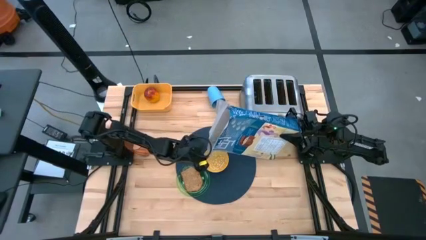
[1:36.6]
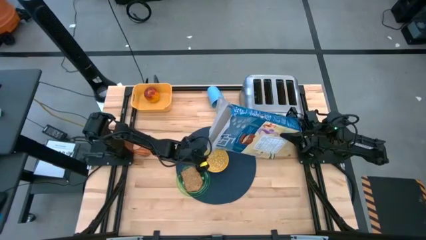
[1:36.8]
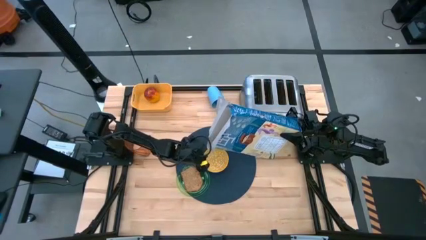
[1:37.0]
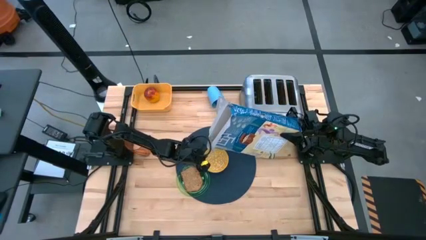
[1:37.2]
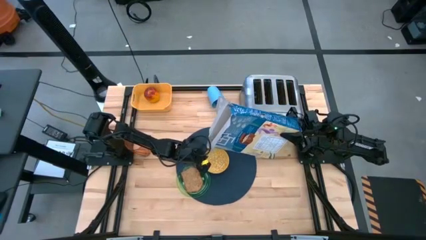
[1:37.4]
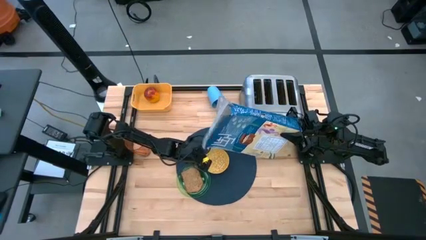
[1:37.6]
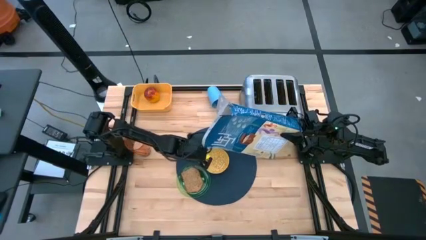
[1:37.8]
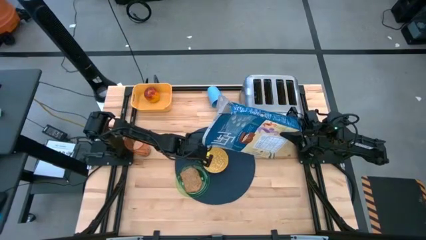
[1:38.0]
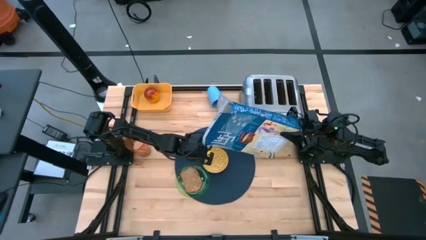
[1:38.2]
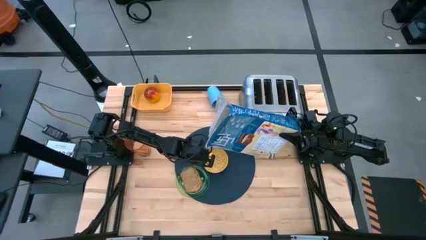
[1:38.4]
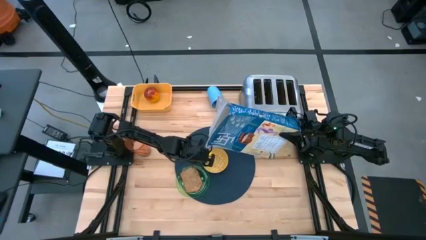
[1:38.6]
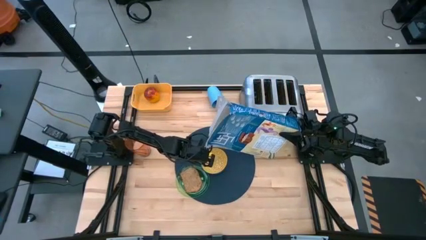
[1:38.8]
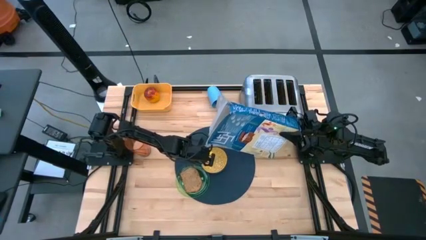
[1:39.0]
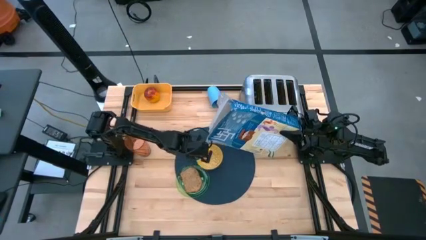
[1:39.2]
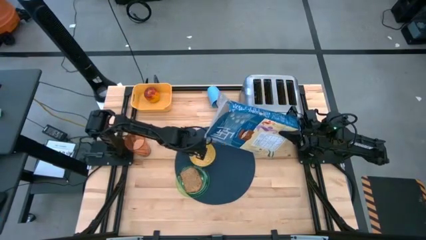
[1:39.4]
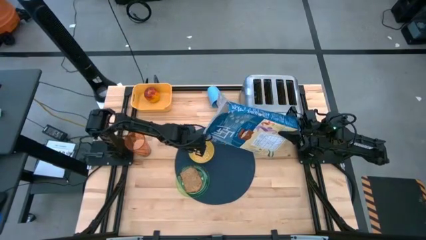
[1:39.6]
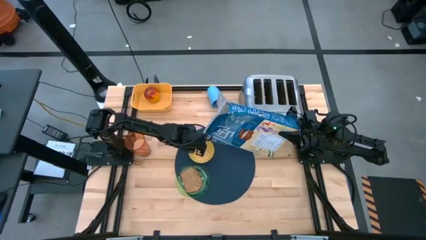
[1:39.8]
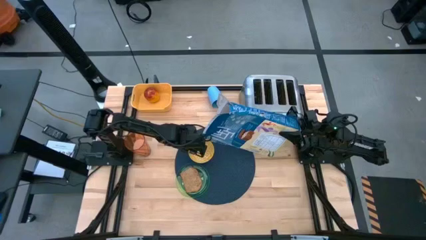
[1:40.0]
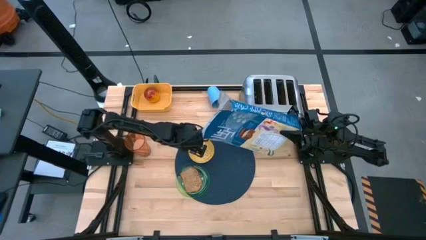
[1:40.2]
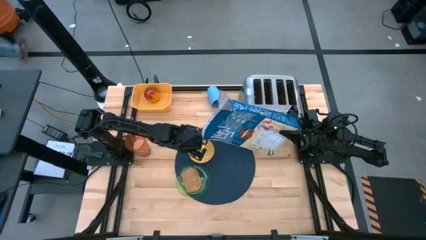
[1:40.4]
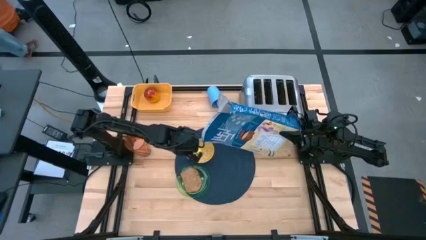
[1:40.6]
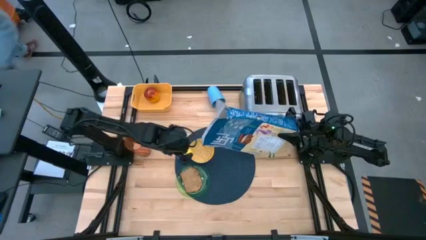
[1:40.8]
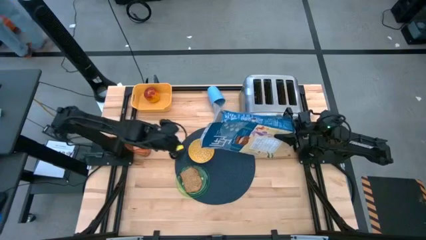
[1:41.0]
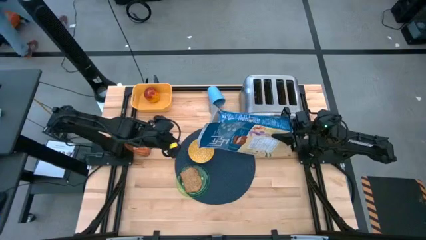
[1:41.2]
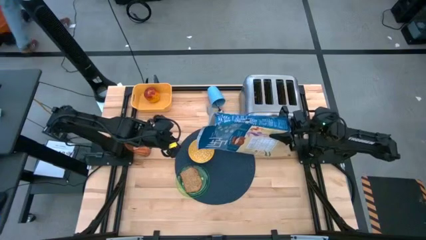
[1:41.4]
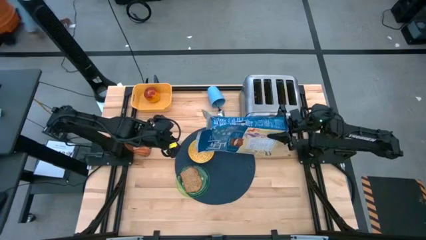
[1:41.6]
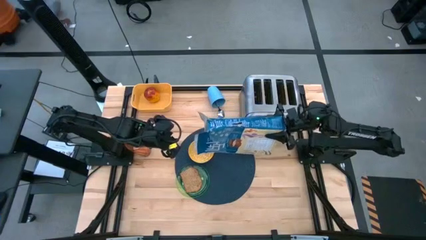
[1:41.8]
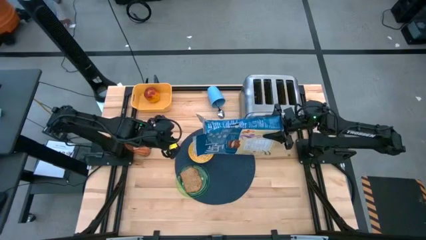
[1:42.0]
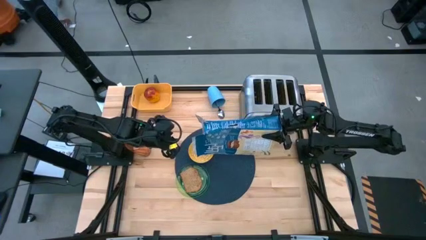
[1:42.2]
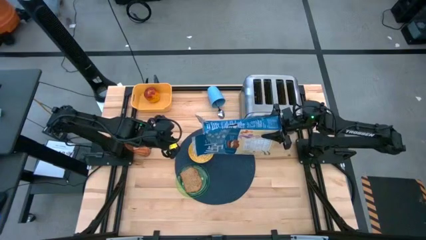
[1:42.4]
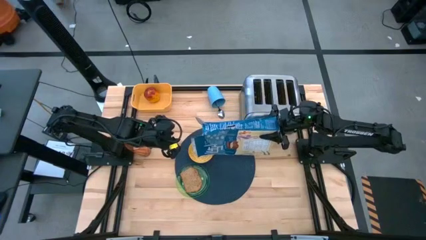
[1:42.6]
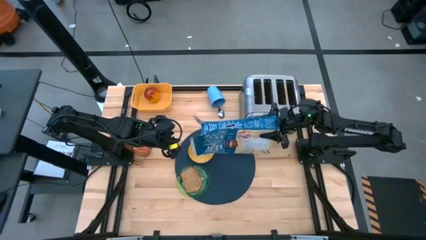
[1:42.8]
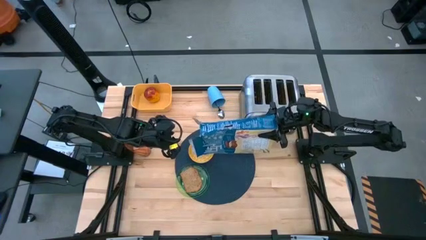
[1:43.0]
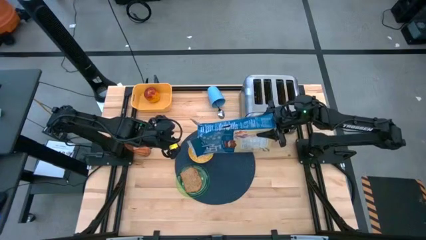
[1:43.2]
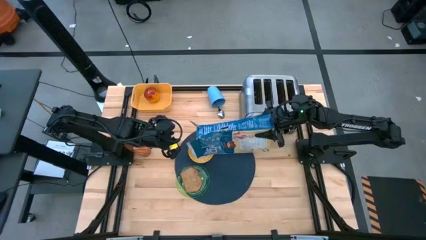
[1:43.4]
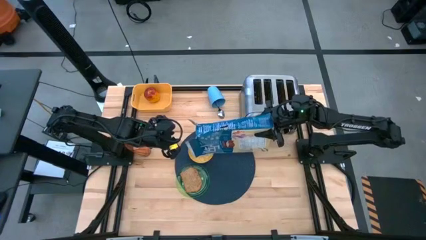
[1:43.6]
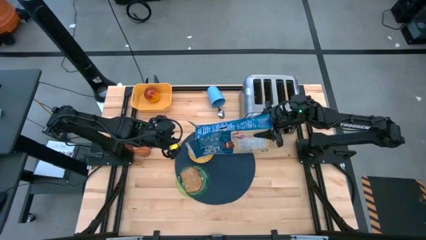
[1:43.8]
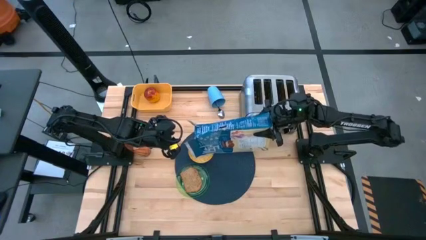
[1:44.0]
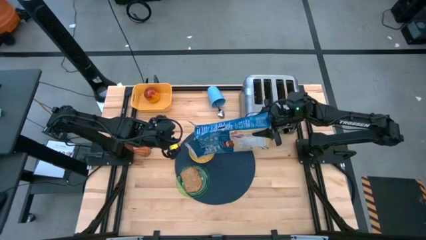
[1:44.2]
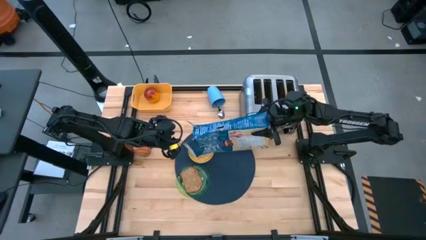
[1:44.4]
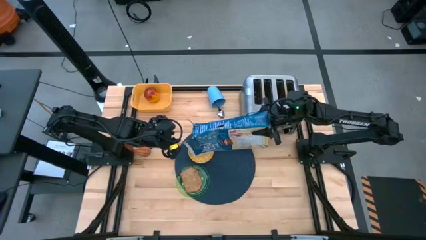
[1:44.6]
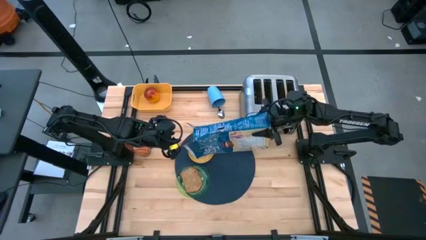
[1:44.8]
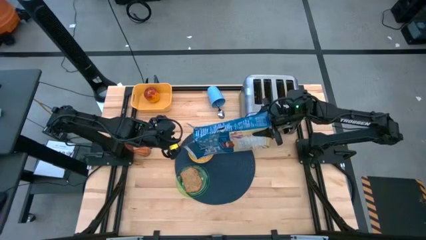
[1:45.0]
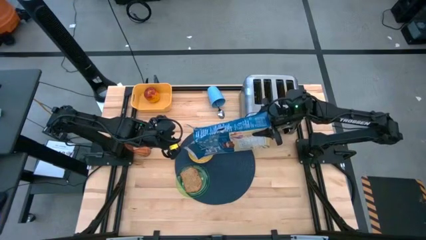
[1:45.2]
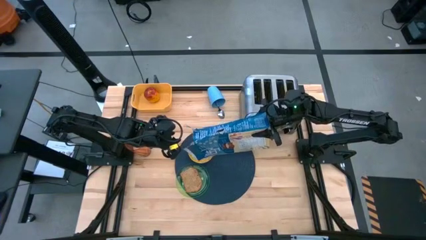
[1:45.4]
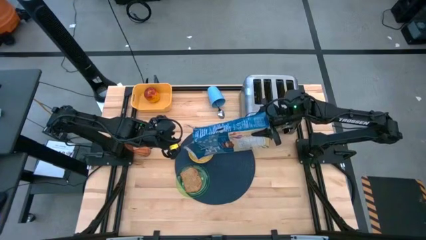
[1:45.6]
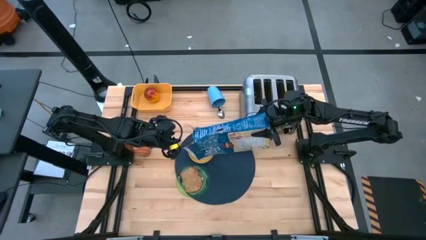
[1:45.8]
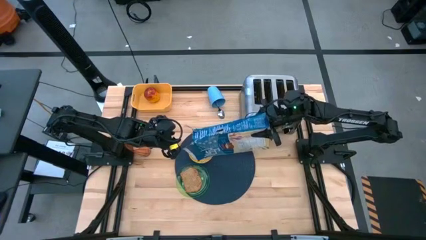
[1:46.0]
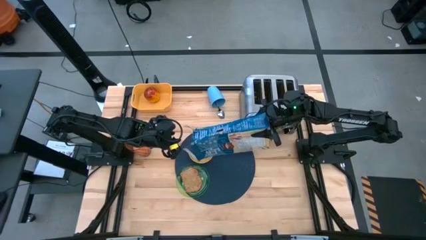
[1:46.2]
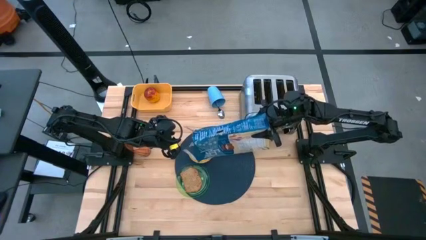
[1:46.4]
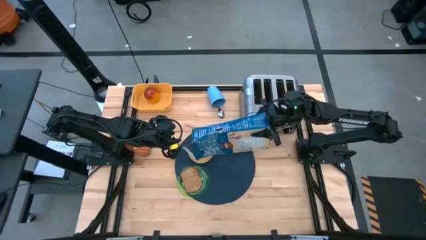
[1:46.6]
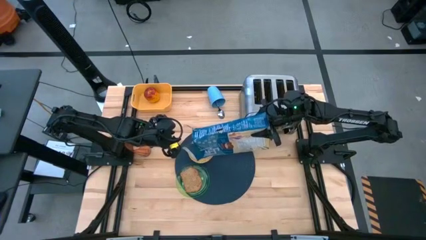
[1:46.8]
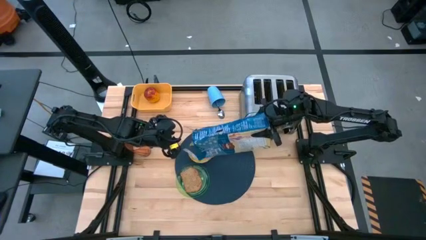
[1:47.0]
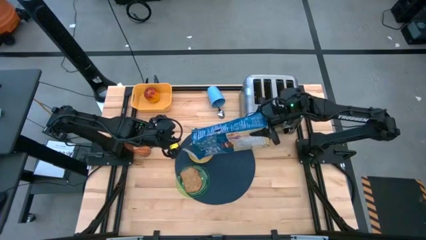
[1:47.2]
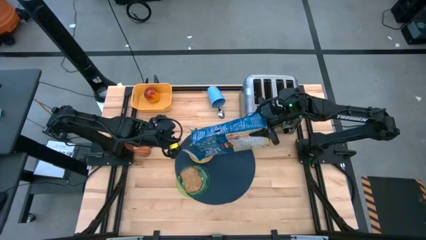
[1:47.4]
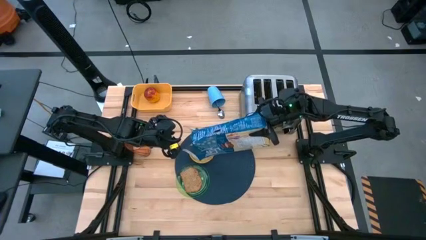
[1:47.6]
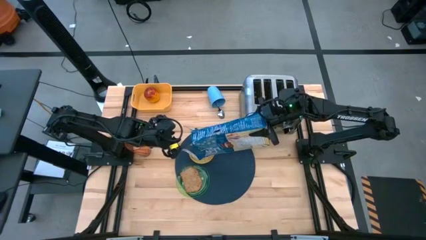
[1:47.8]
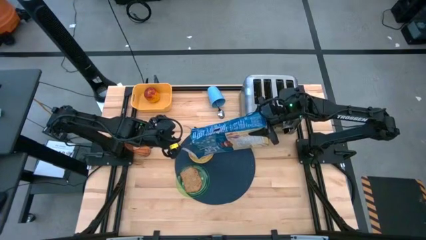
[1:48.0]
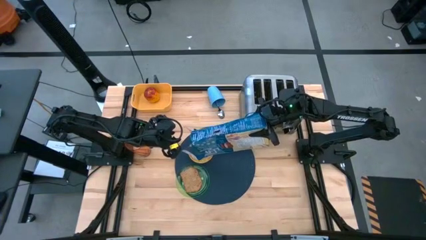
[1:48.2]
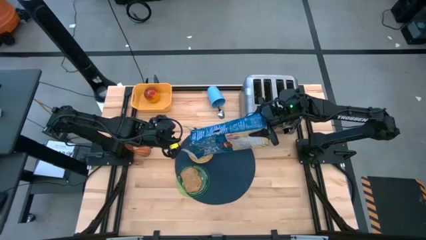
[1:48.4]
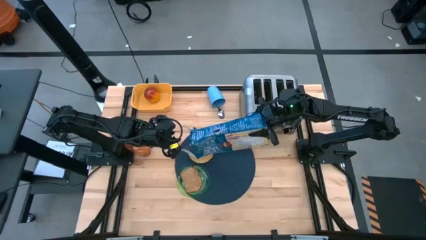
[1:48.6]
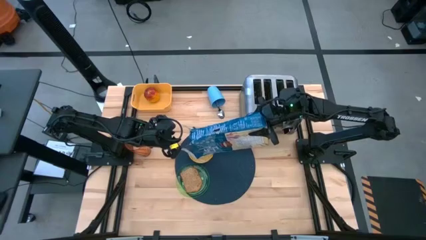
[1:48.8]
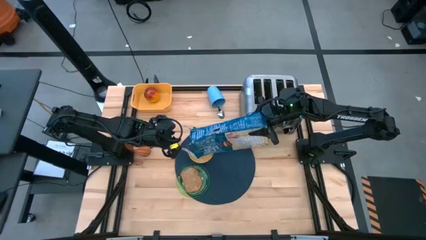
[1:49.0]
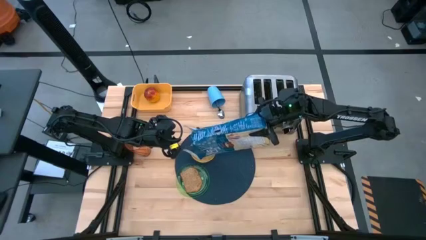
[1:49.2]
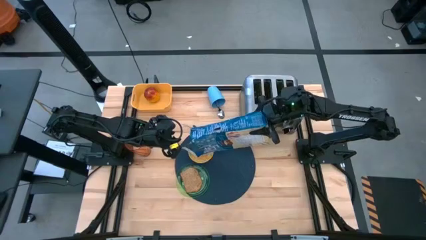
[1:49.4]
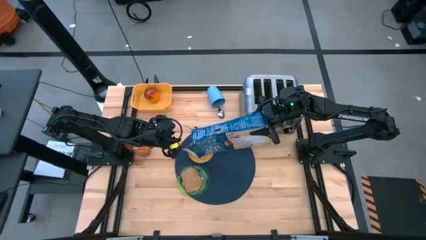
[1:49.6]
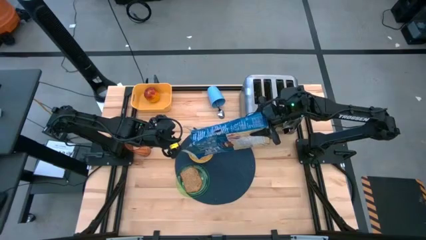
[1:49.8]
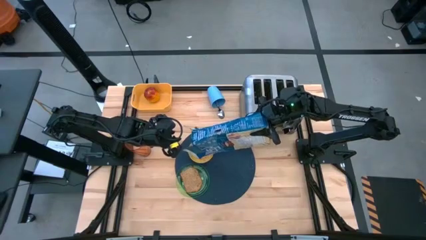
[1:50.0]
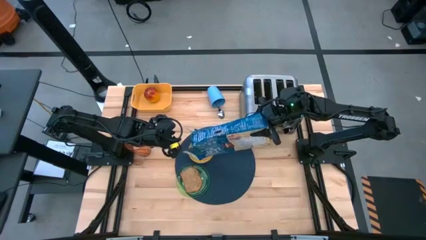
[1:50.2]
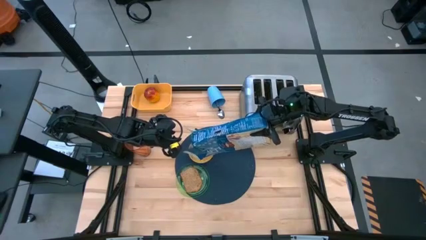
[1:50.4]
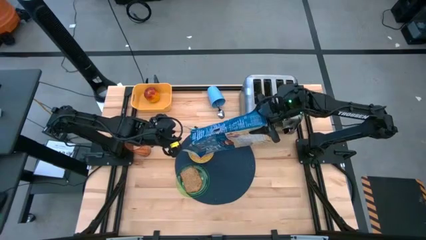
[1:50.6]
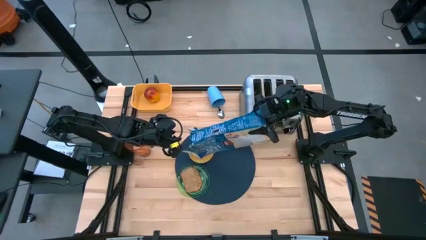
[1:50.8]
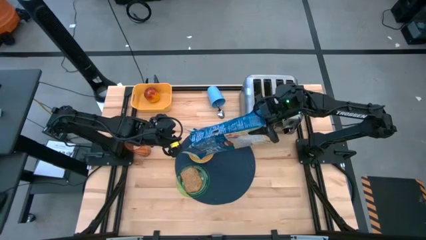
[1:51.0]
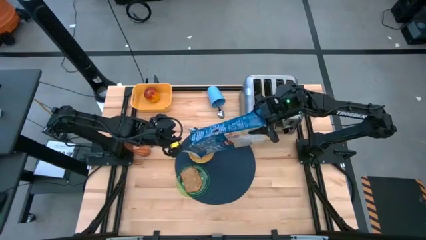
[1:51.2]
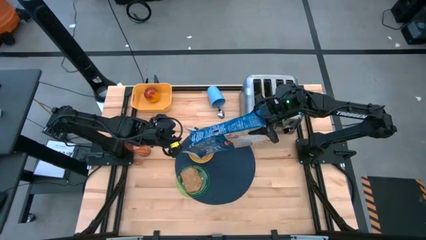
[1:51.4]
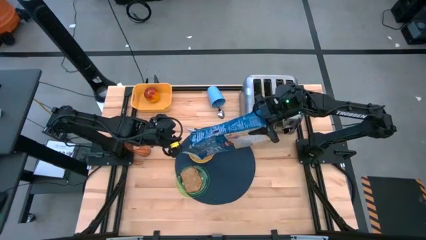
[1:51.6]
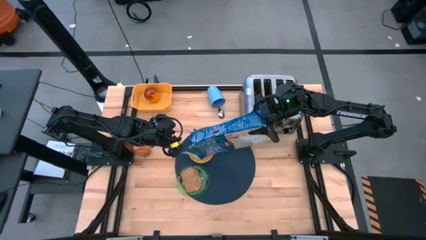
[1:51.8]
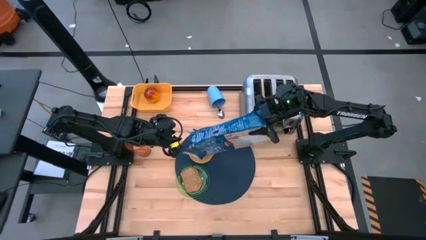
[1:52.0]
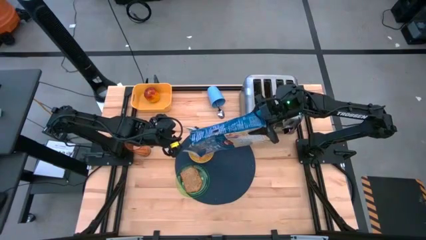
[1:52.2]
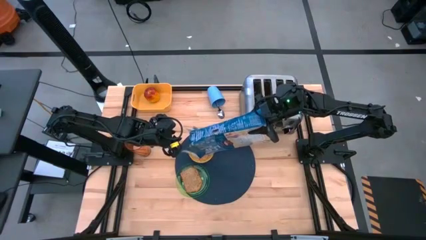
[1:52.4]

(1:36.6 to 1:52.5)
Task: Arrange a breakfast setting
Pour the cereal in the yellow bowl on the dark blue table mat
